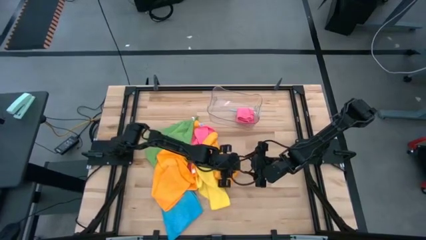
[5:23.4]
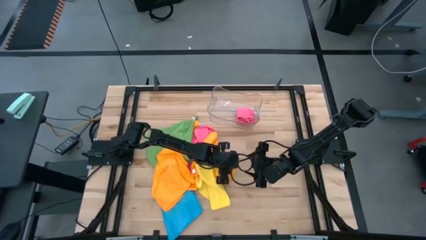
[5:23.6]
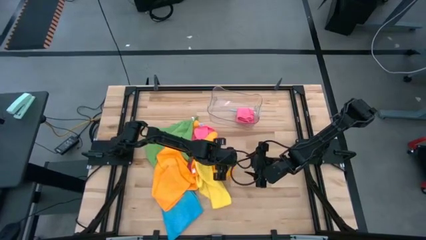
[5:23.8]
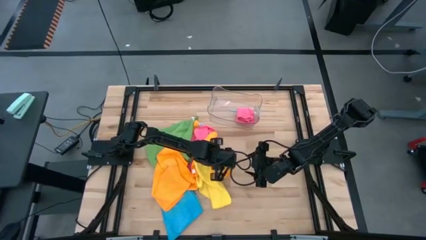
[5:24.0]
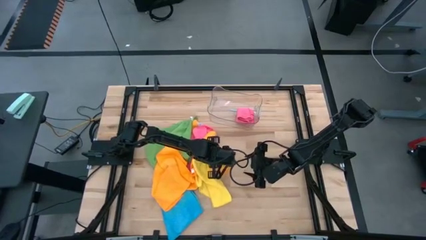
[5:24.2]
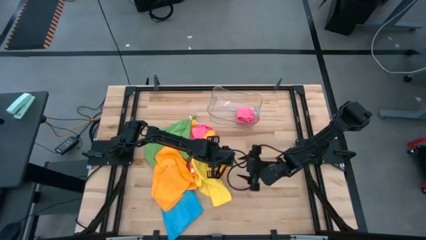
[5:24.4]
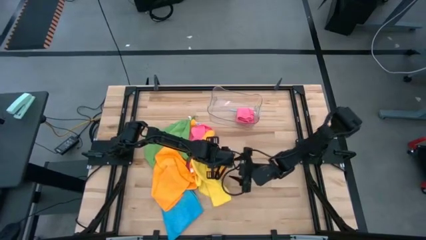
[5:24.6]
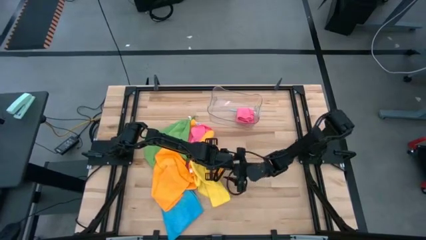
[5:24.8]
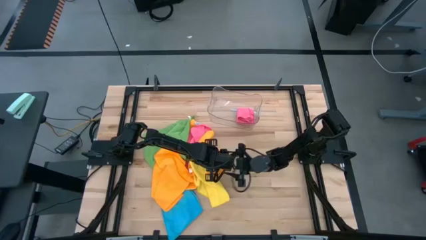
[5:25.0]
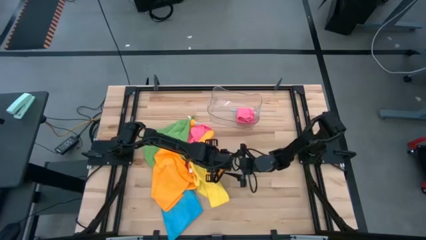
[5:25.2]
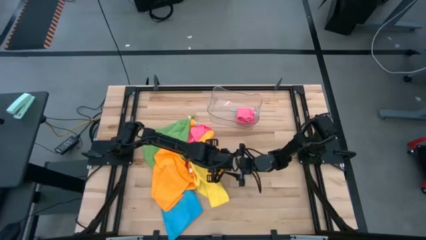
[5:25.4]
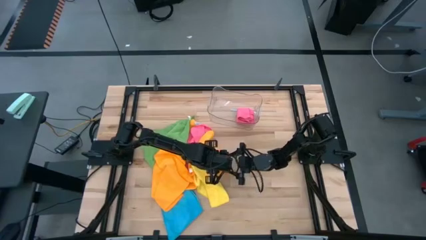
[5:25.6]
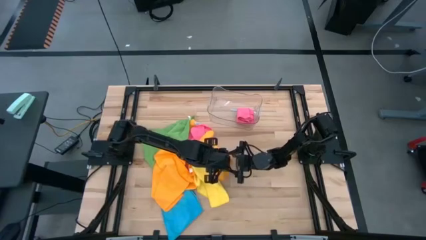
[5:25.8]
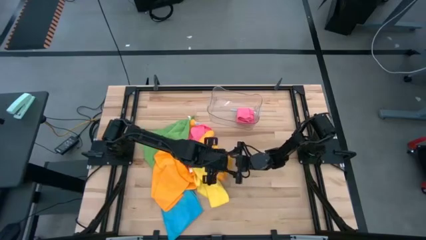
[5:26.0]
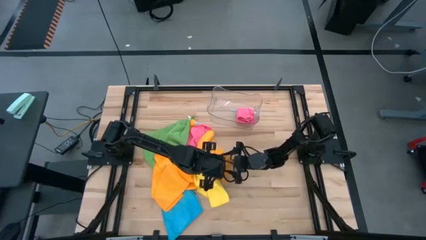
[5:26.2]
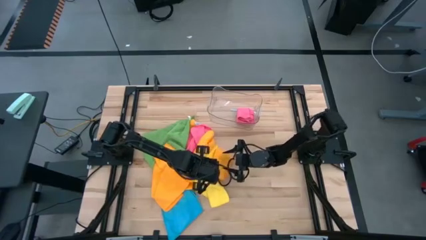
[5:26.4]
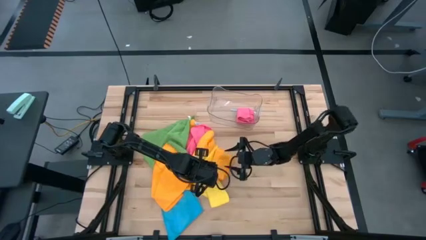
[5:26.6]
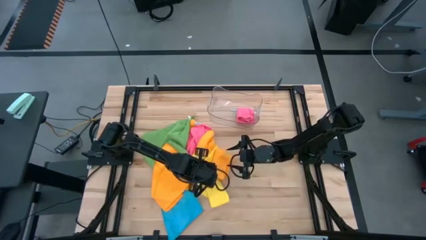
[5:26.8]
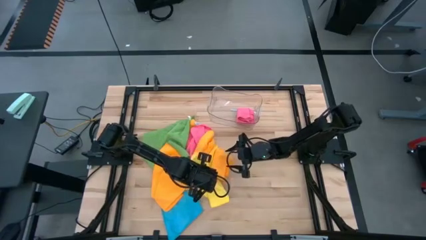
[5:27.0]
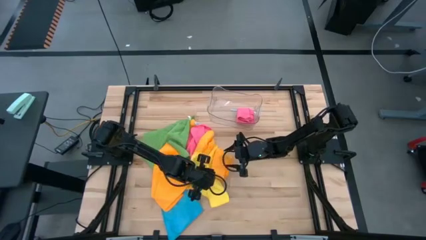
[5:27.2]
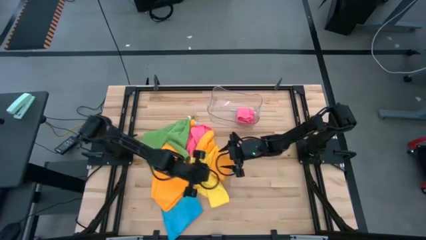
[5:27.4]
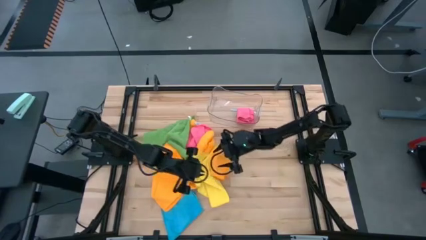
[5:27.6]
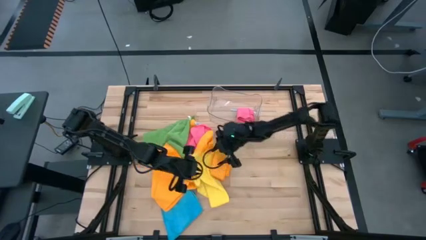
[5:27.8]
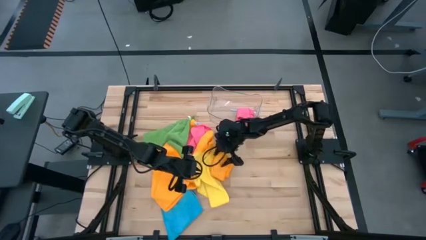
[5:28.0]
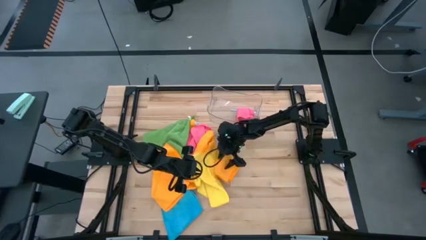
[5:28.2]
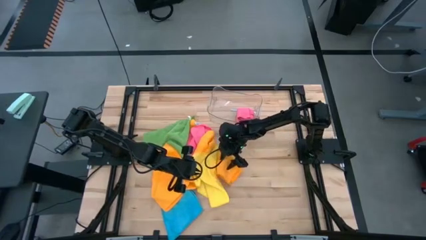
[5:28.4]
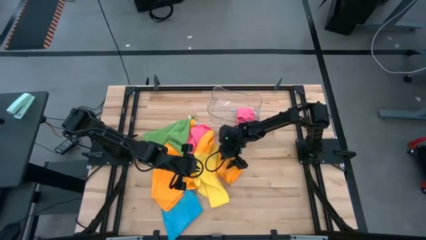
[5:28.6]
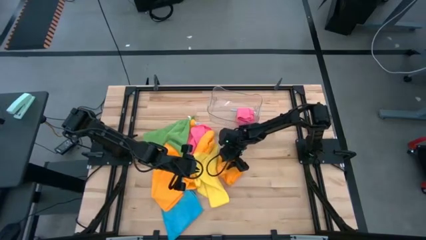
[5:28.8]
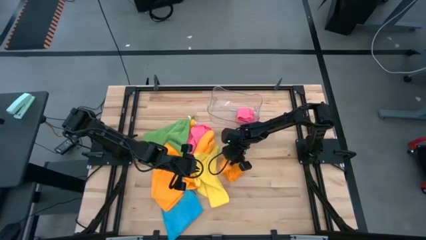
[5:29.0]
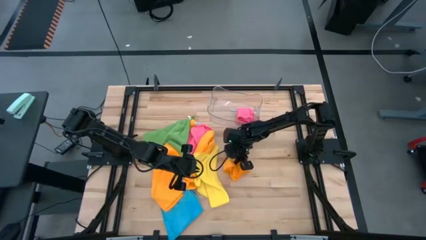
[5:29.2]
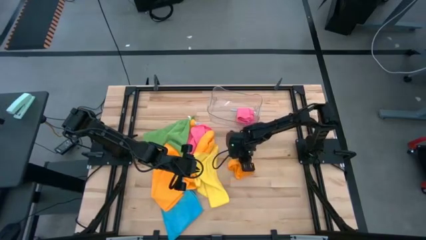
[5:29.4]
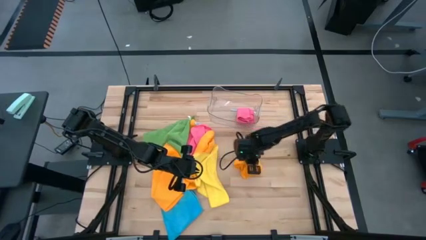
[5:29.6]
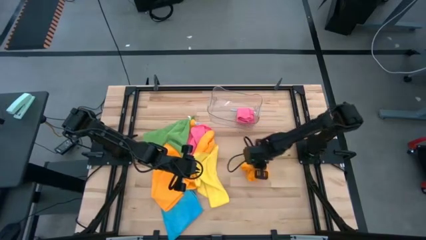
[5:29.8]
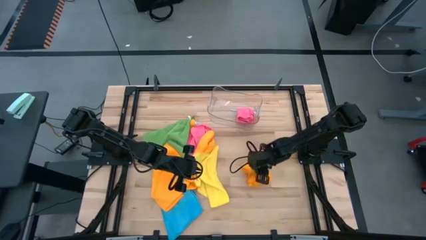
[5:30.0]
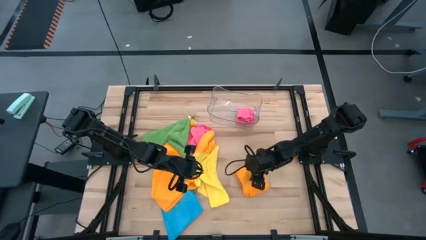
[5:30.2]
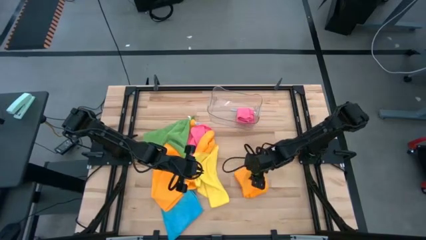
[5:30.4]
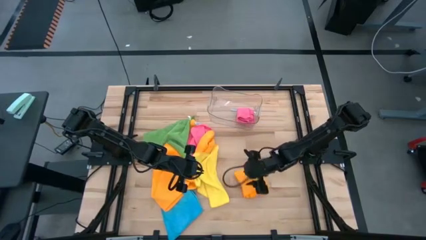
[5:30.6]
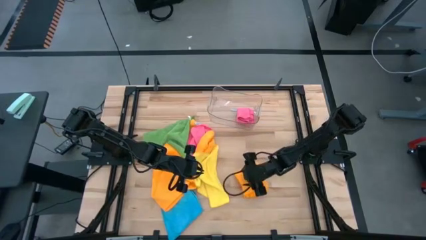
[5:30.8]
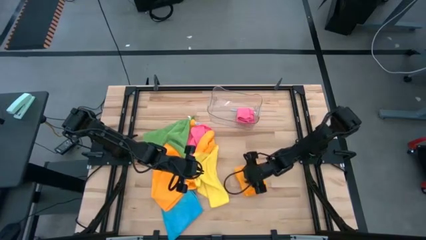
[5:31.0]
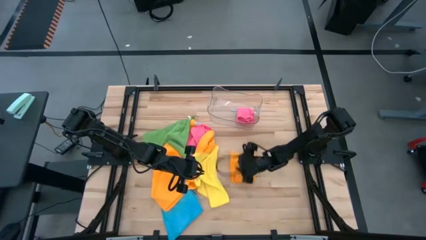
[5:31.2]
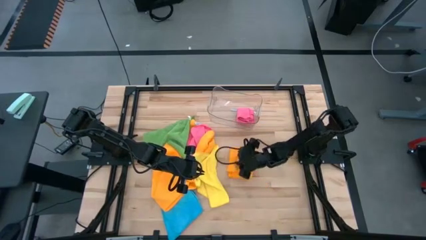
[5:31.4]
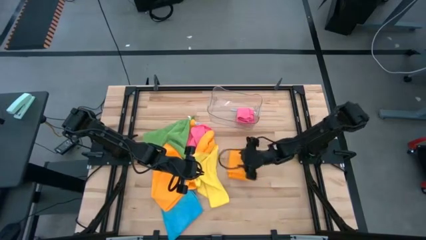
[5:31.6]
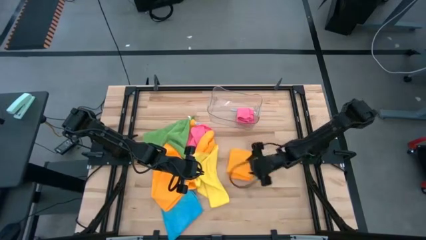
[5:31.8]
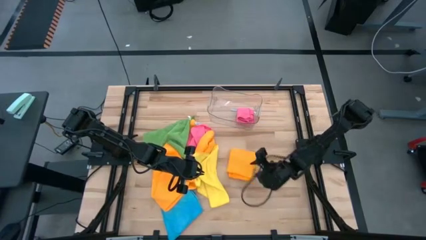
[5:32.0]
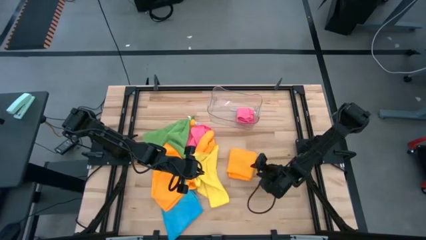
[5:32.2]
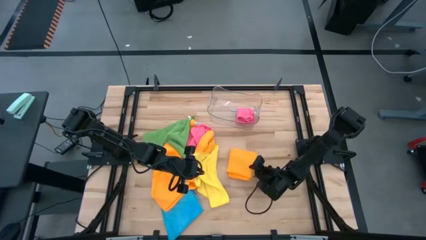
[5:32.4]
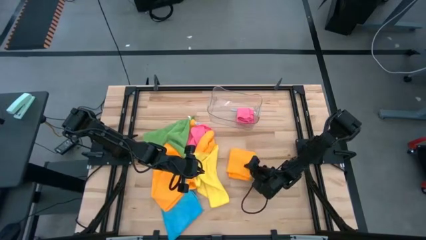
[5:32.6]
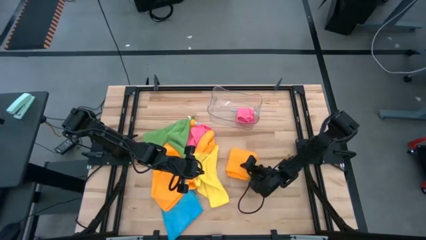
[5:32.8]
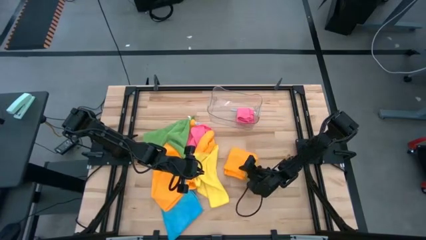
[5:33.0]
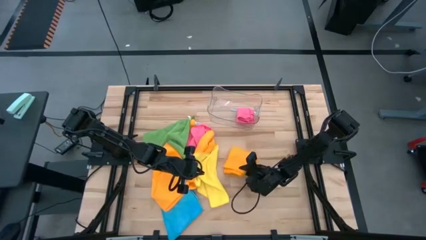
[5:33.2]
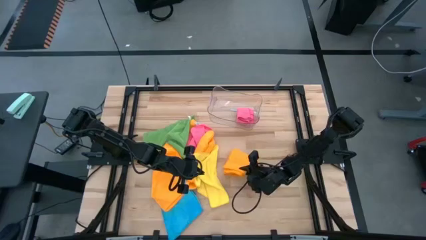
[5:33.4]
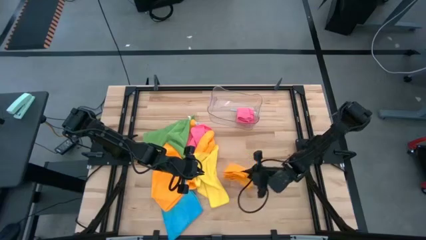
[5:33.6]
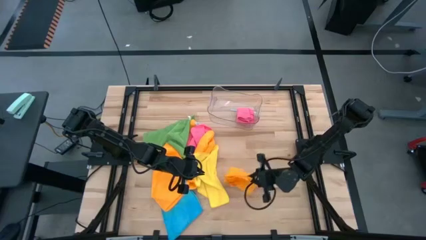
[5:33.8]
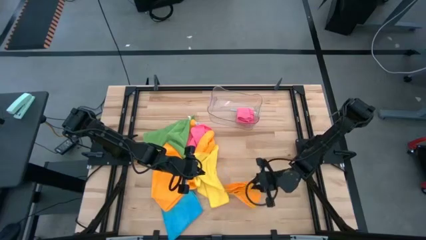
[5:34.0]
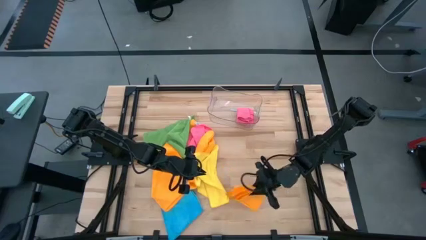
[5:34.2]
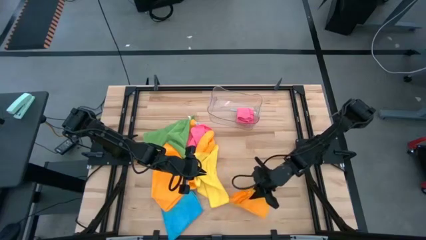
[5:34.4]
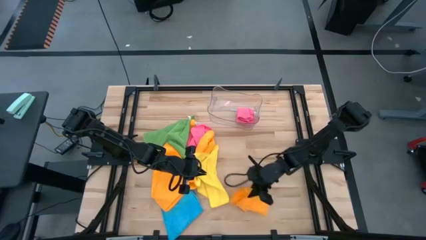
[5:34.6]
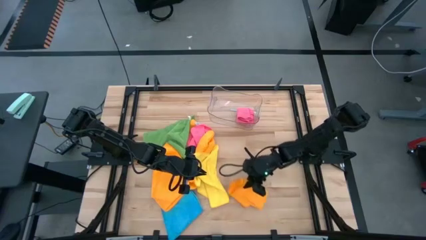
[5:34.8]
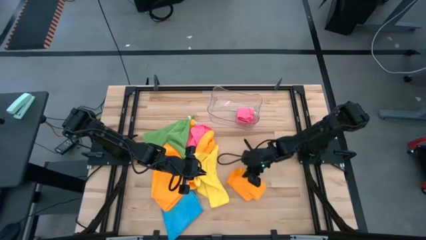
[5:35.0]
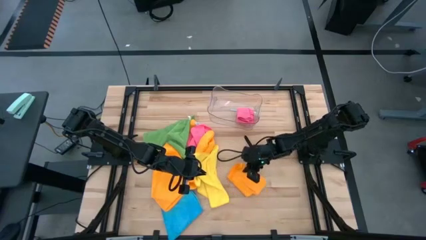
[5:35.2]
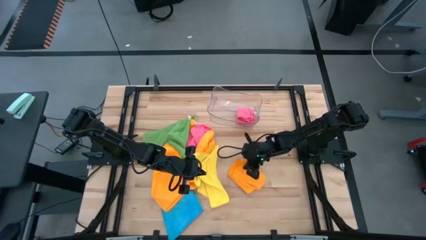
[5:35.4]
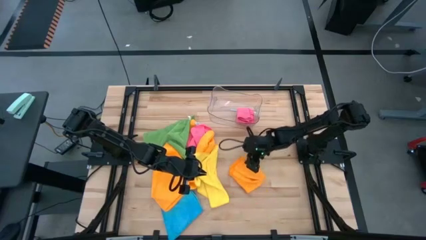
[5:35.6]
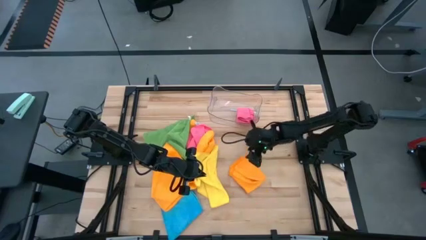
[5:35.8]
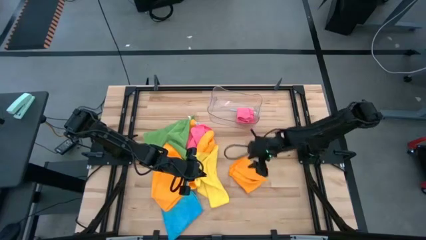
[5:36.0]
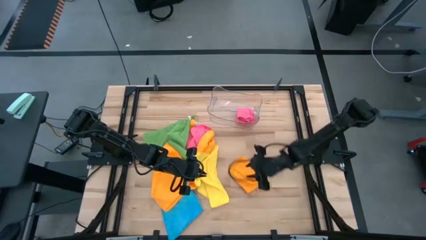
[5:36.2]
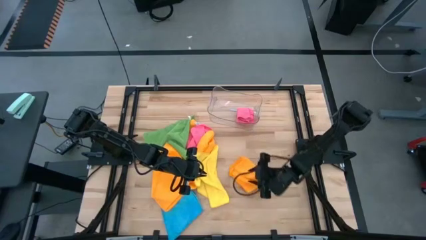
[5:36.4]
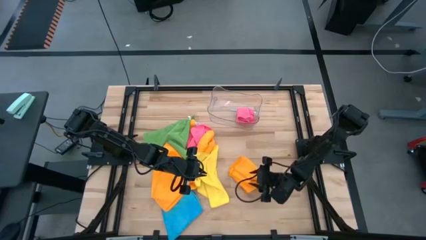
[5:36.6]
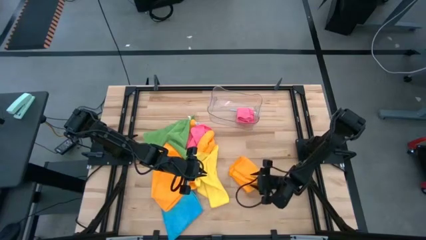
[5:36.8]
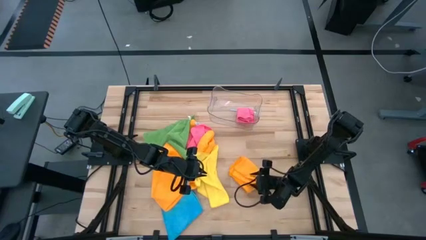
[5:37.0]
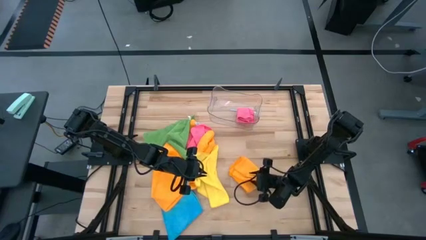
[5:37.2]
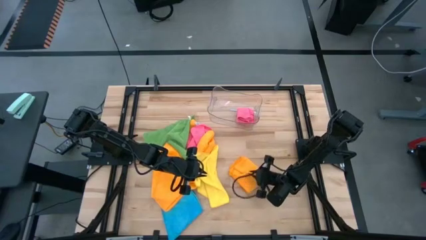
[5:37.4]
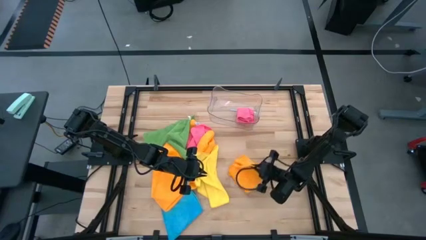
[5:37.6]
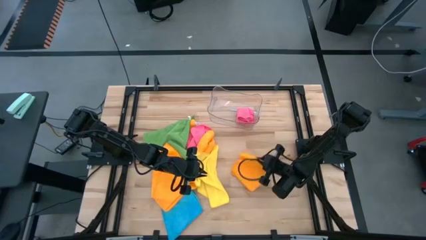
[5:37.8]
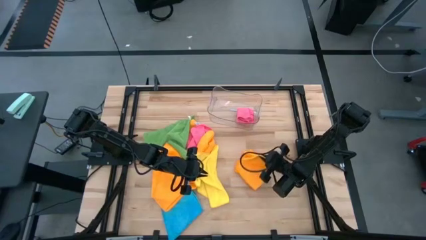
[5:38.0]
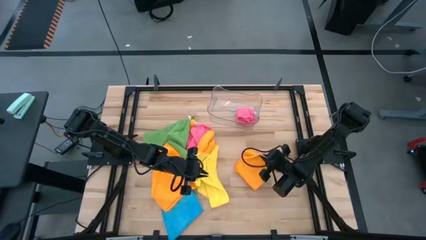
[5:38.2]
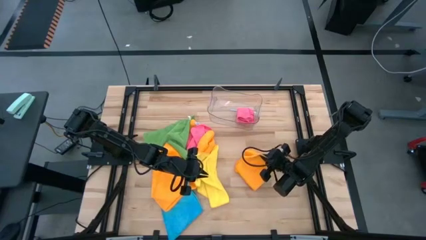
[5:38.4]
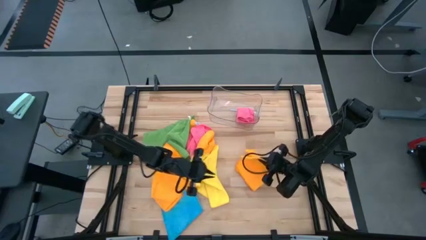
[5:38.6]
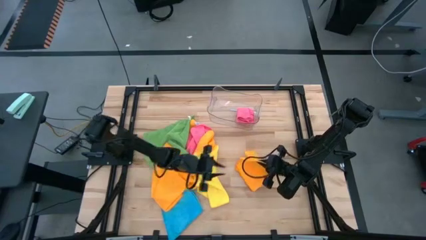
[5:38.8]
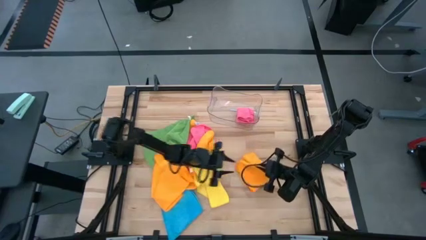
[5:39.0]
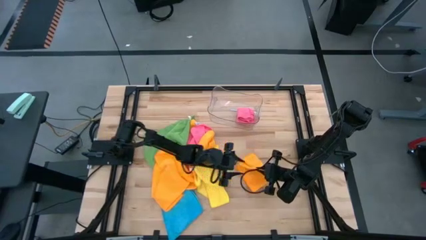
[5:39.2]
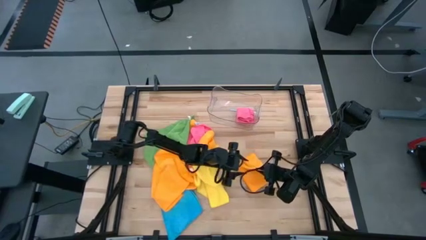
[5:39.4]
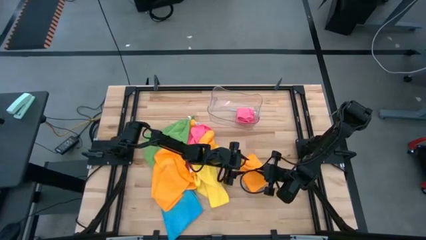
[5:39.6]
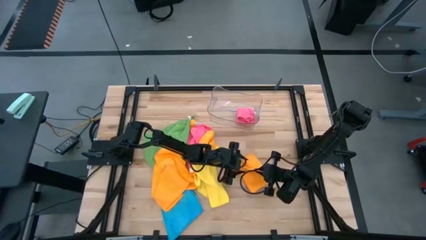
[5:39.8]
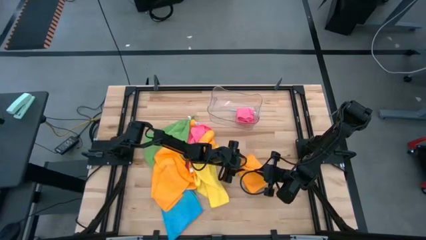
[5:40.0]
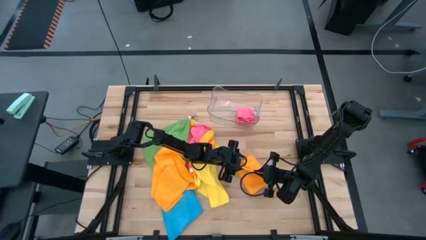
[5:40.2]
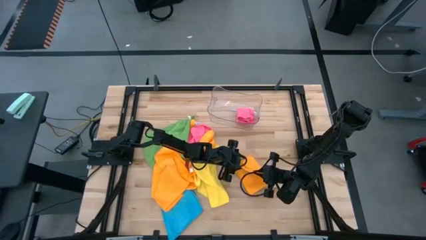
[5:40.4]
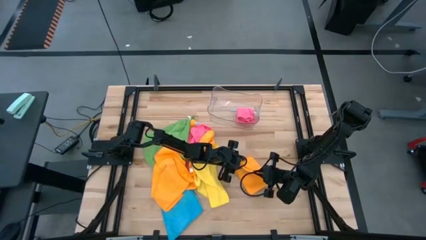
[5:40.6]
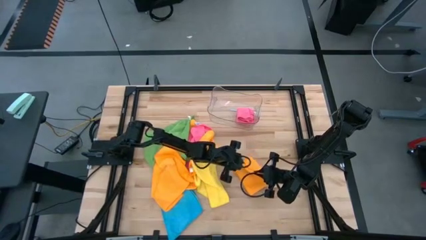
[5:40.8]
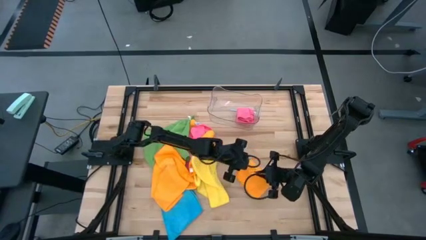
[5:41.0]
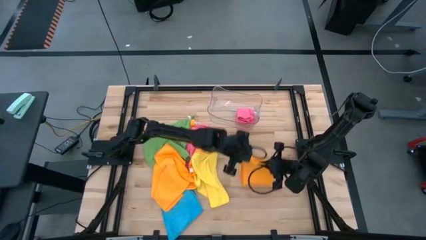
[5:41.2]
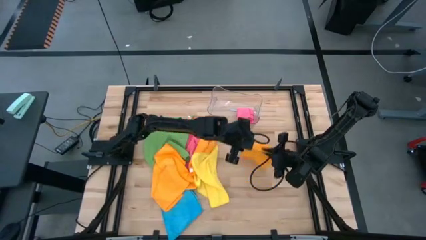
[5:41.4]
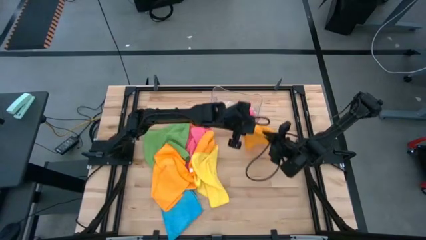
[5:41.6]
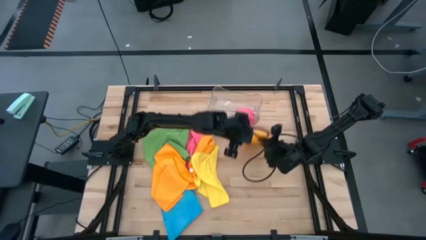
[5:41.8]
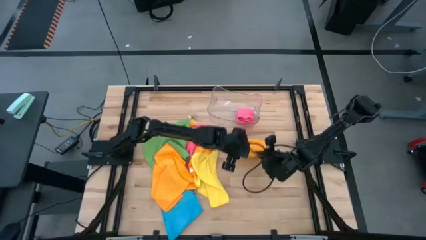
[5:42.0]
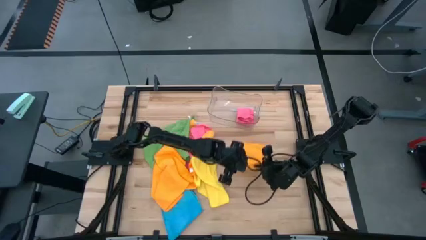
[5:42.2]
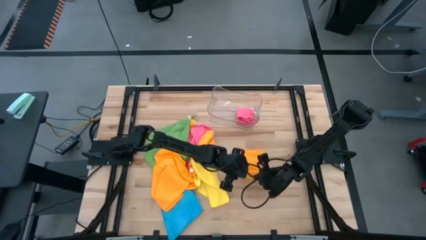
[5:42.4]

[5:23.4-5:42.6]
Task: Fold microfiber towels
Fold the right orange microfiber cloth
